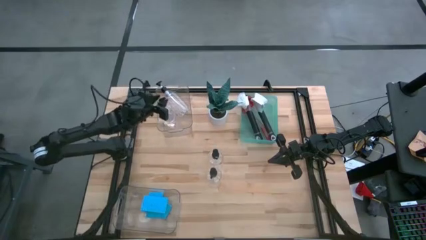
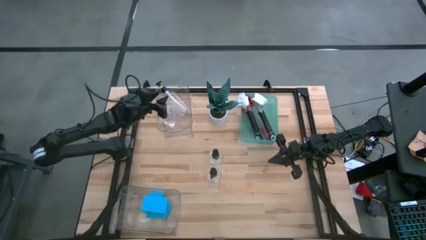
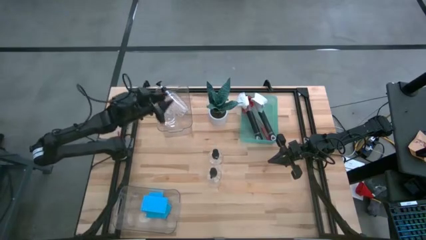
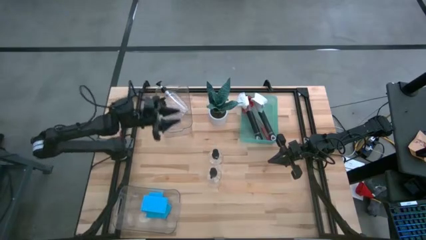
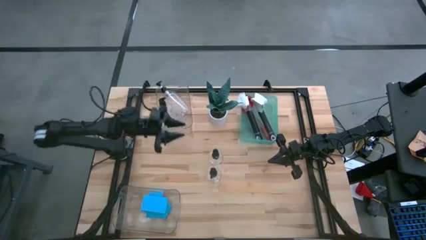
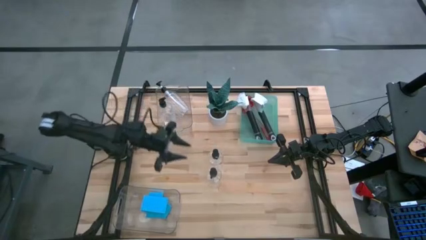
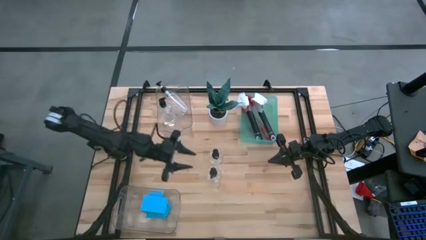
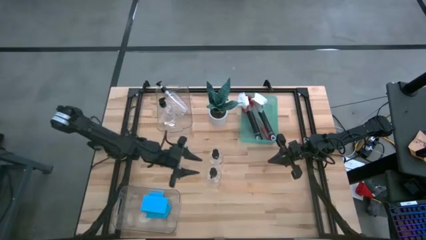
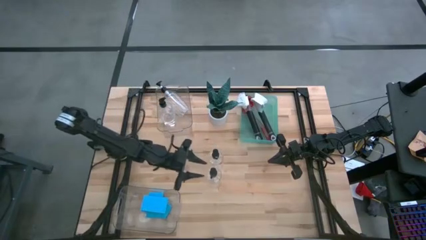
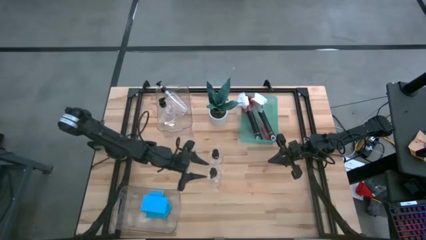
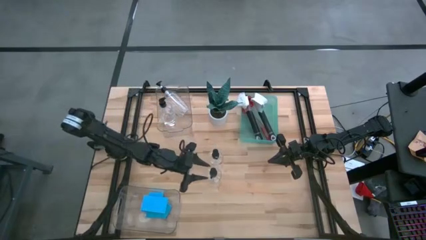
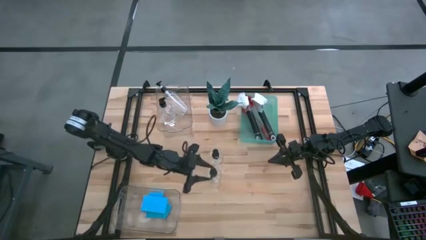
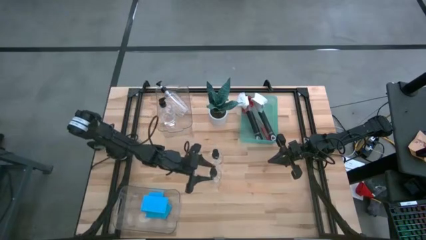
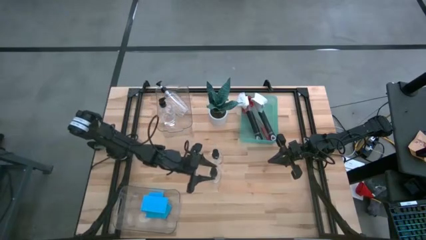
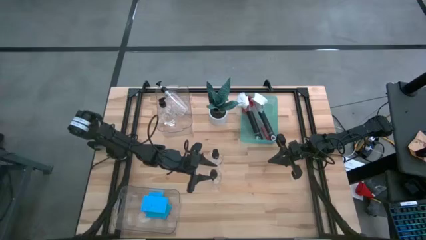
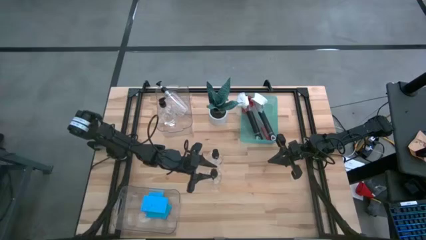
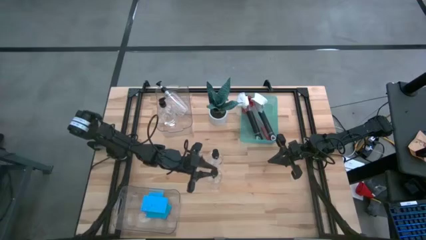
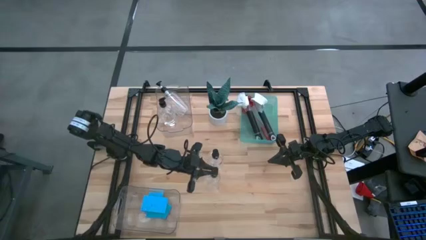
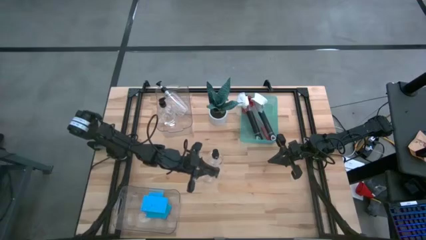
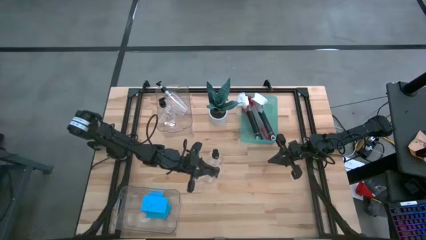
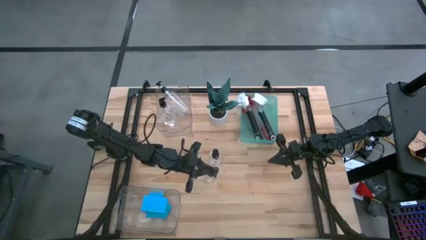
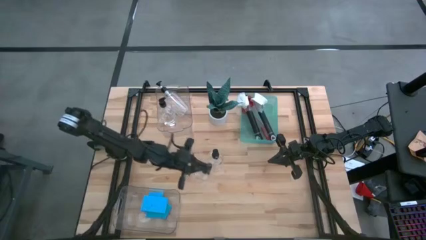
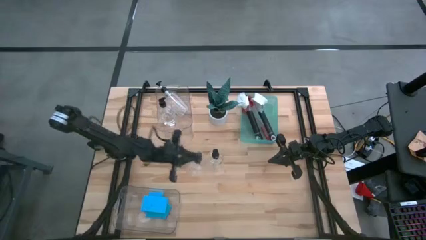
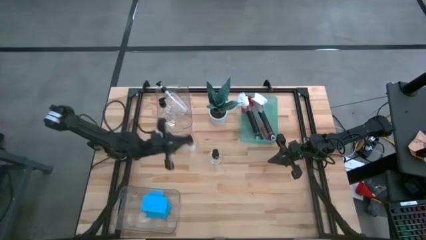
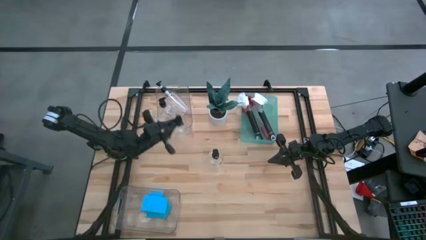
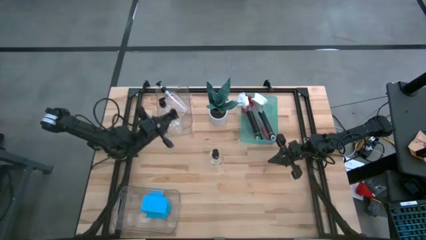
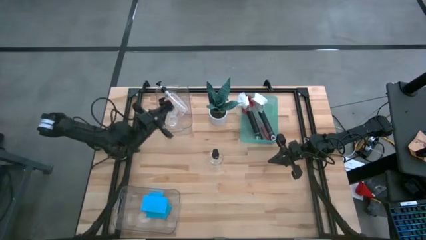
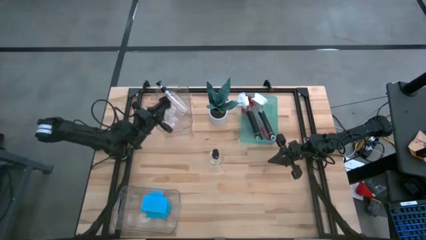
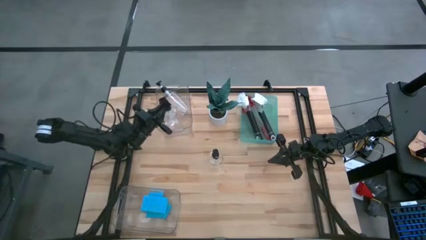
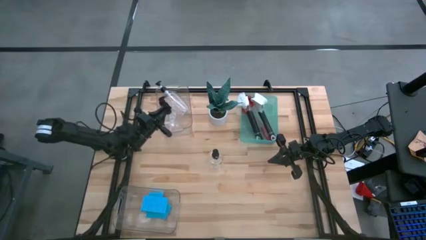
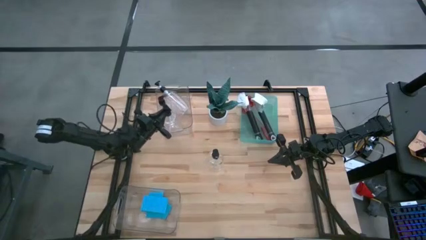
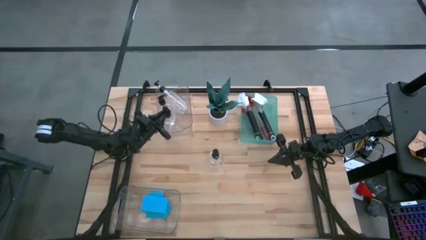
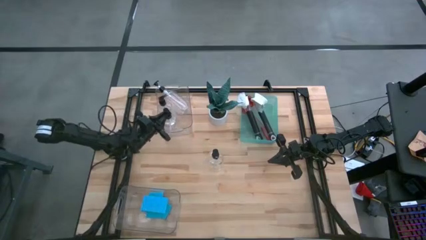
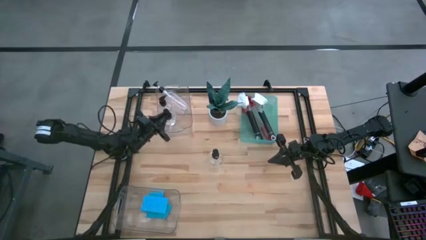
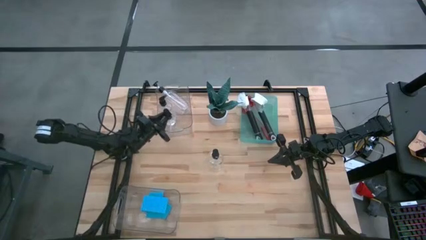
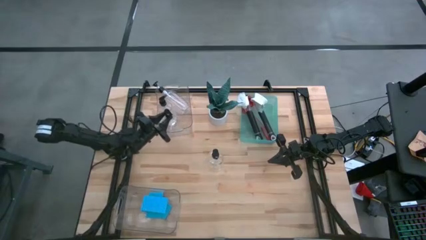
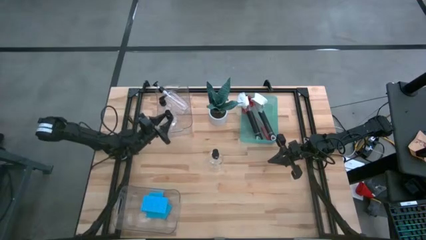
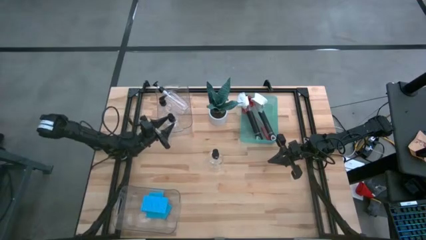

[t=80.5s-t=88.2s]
Task: Pick & Place Kitchen Sink Supplies
Put the black soap dispenser into the top transparent bin

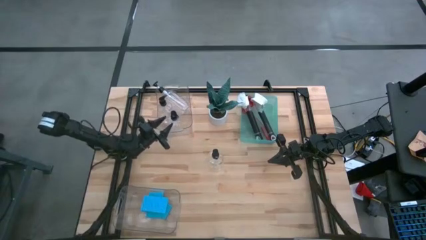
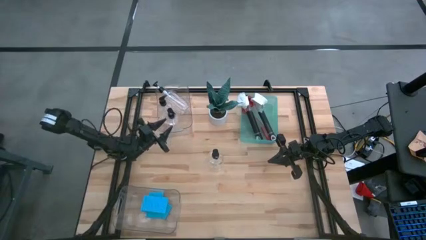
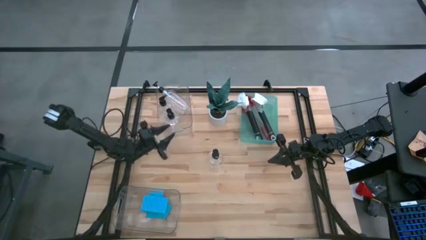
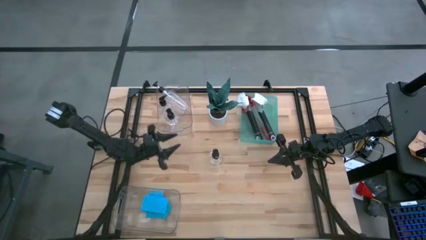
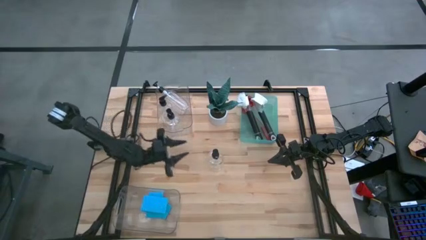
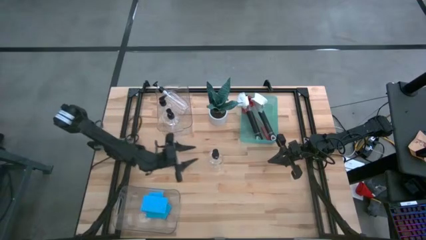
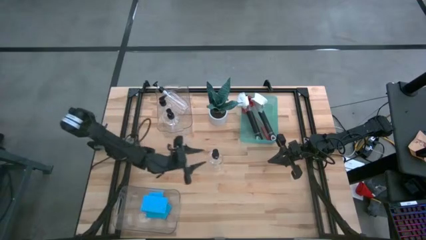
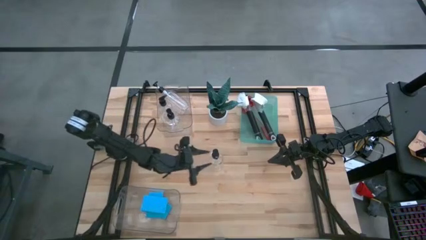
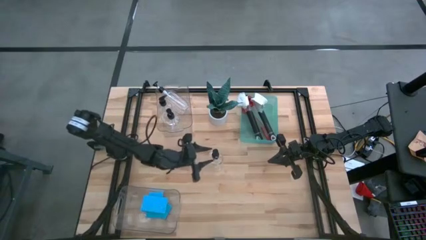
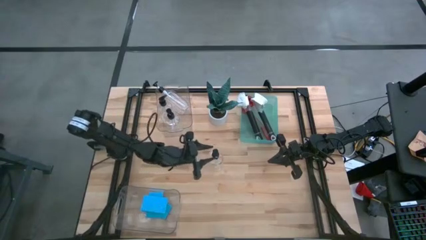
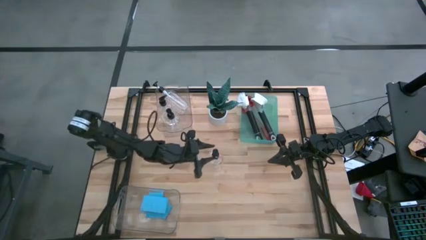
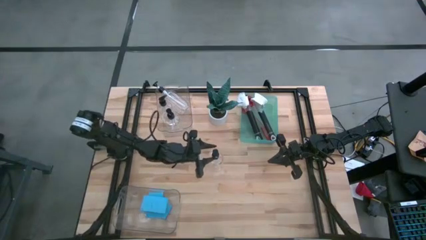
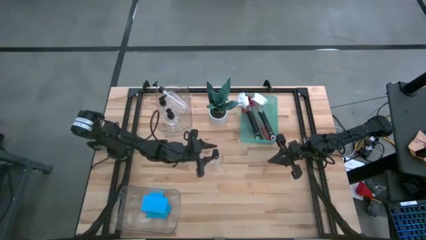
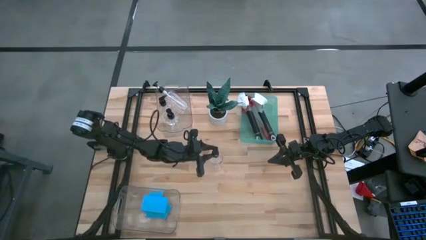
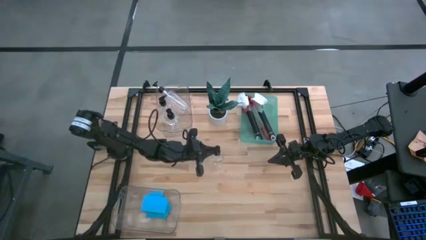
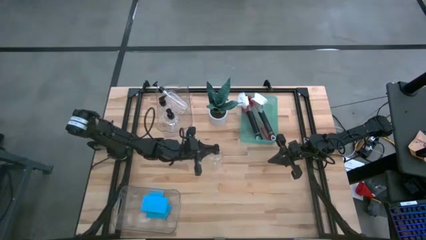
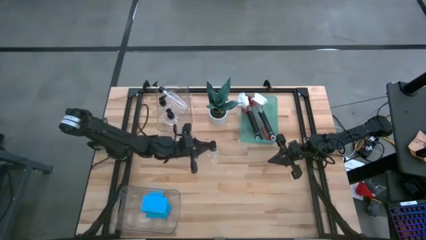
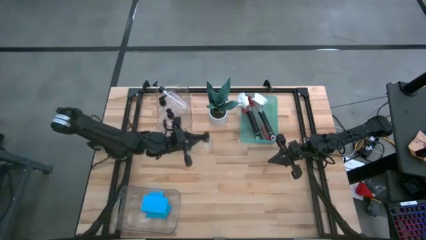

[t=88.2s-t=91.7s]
Put the black soap dispenser into the top transparent bin

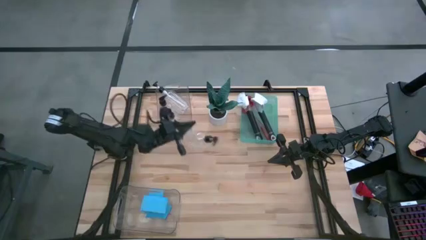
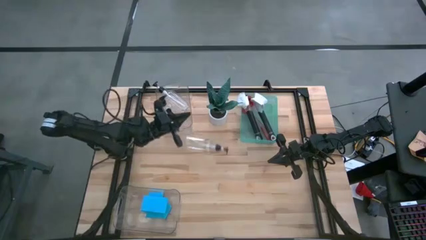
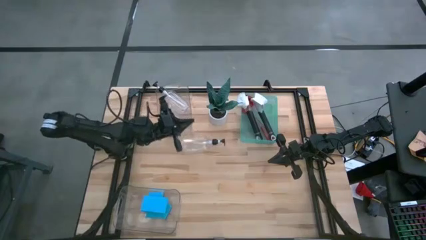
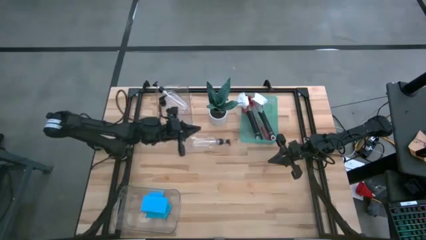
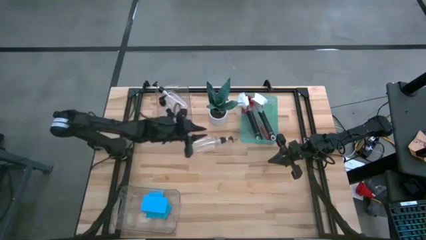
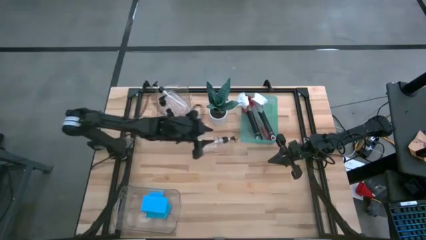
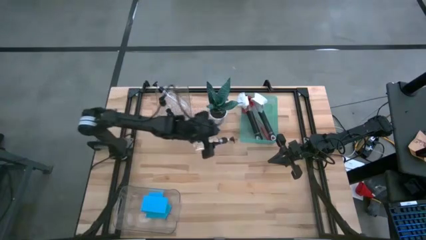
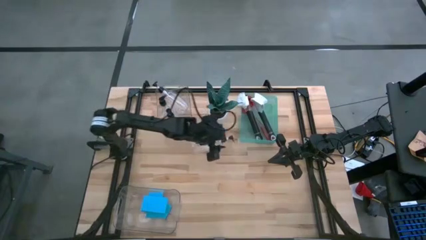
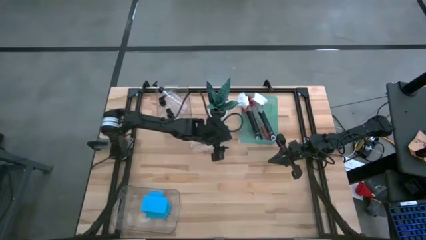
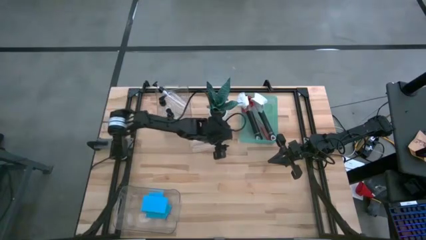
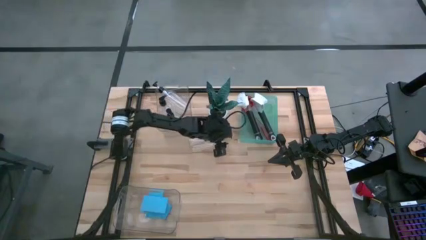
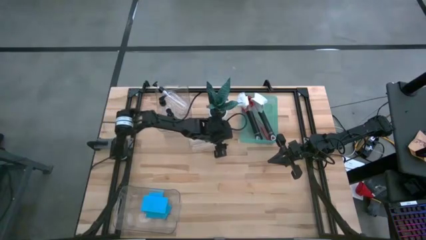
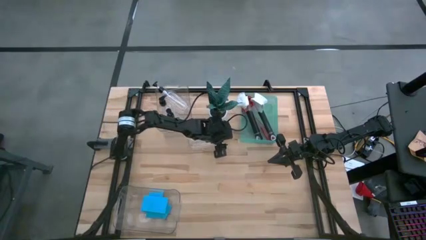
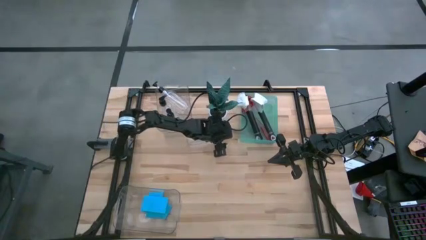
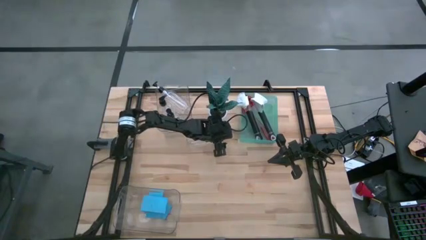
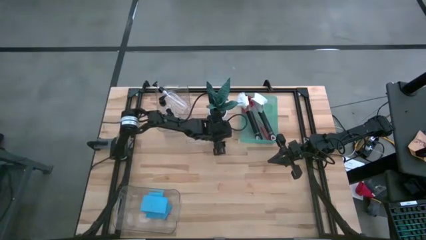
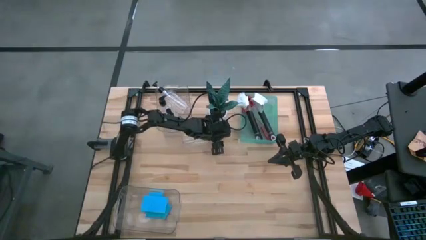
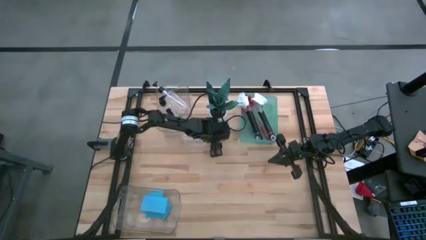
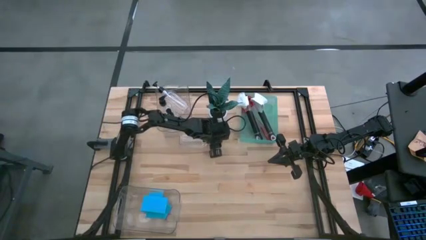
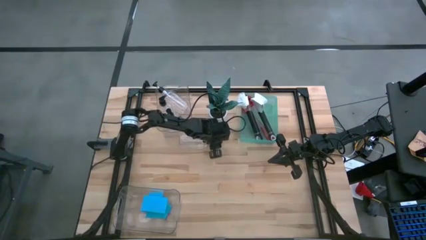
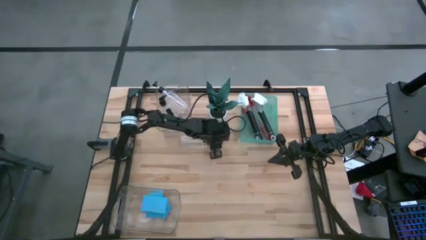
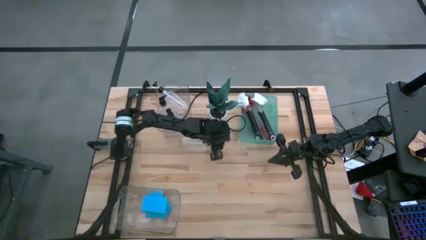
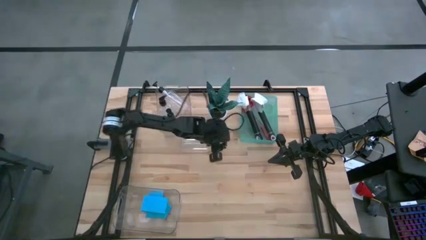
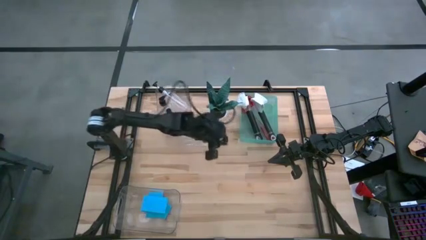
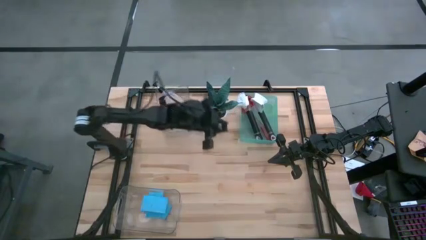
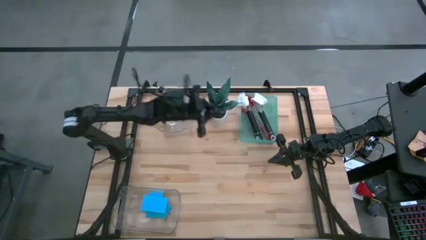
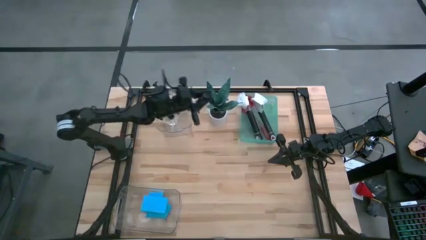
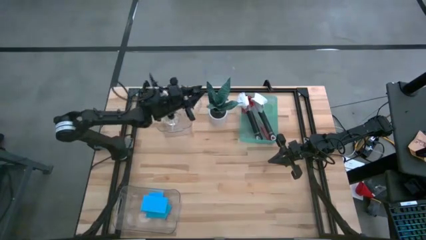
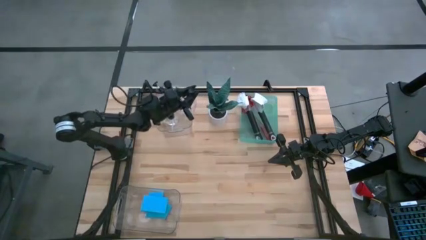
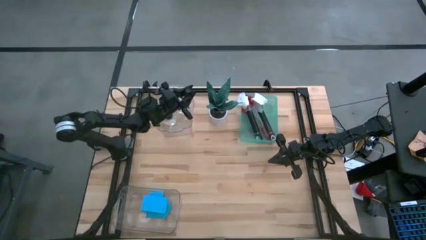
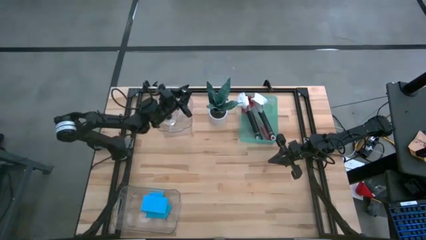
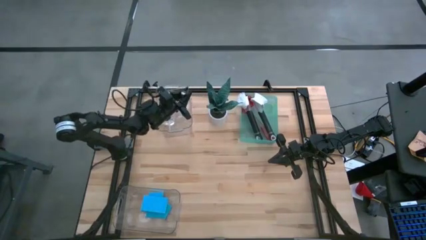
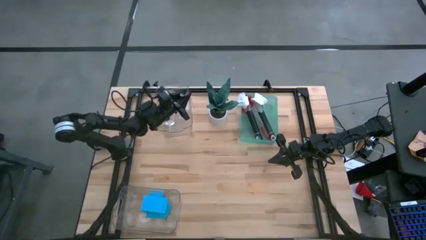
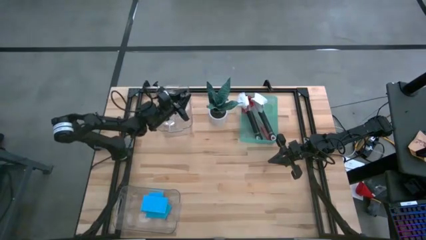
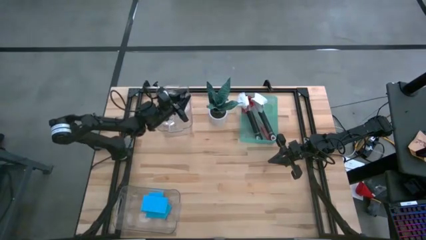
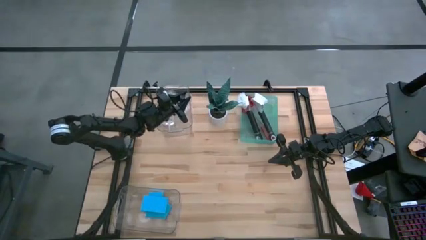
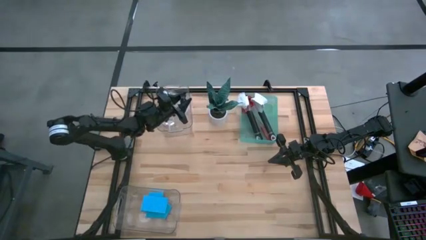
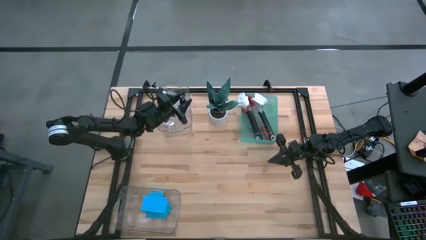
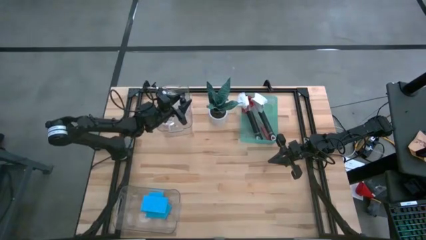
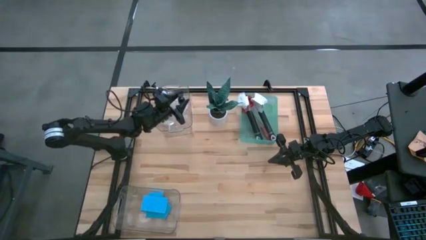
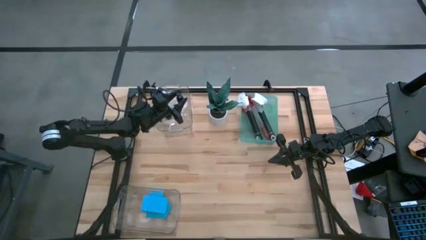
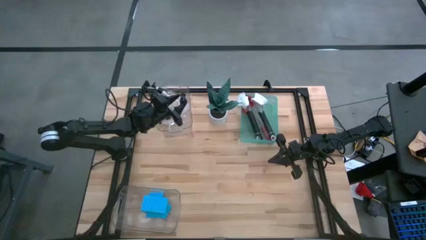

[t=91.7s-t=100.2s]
Put the black soap dispenser into the top transparent bin
